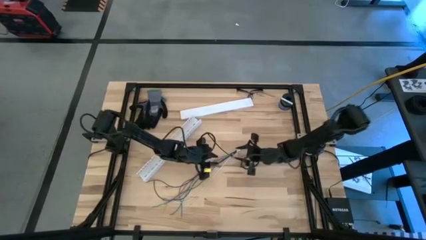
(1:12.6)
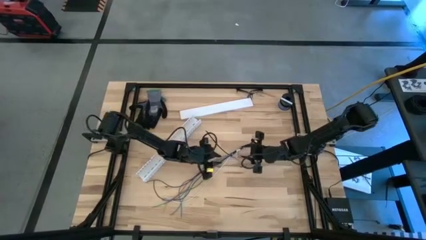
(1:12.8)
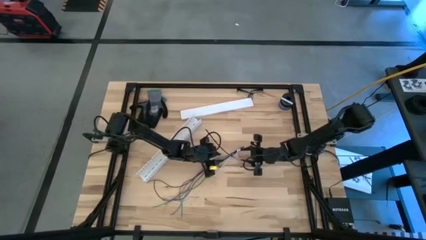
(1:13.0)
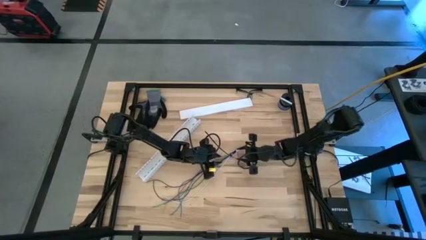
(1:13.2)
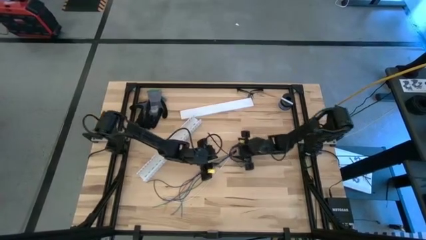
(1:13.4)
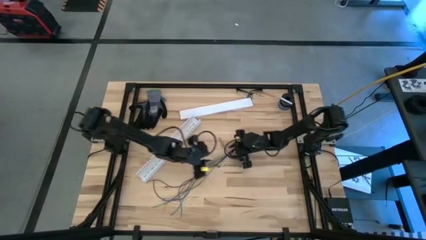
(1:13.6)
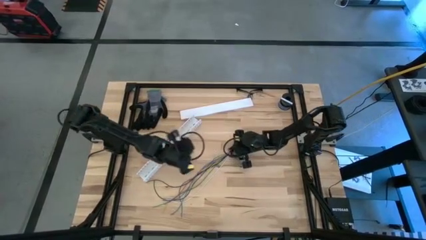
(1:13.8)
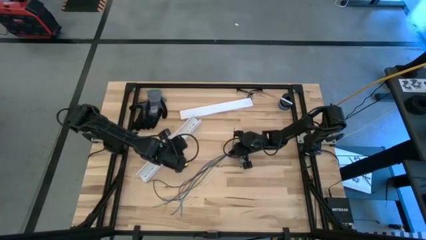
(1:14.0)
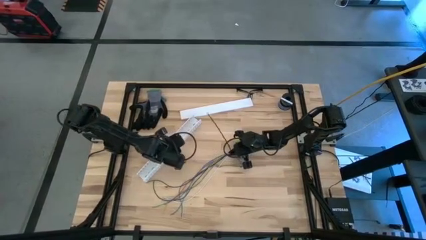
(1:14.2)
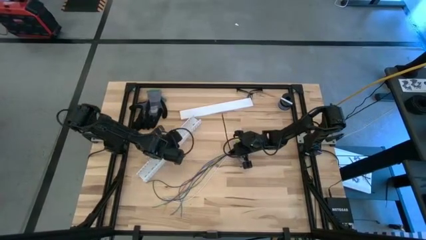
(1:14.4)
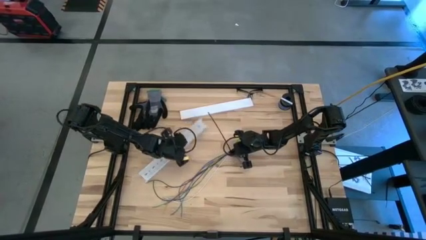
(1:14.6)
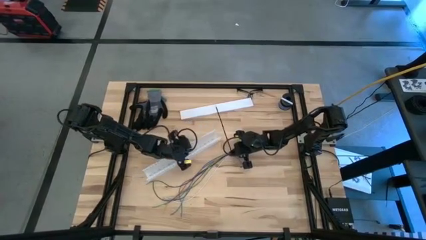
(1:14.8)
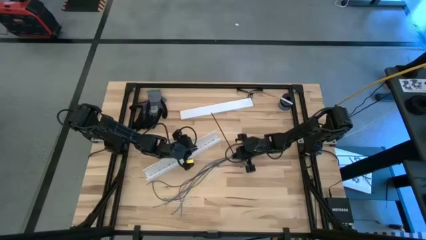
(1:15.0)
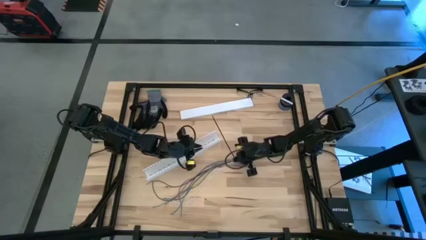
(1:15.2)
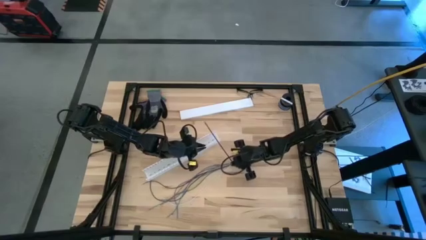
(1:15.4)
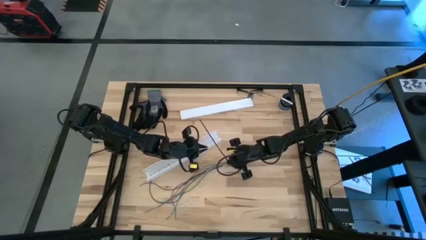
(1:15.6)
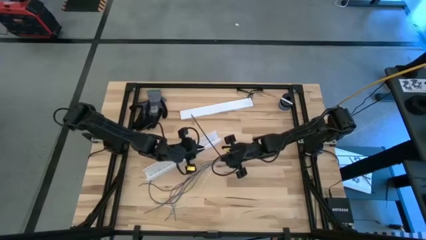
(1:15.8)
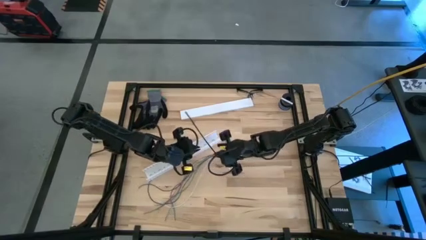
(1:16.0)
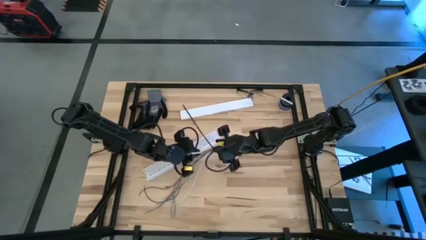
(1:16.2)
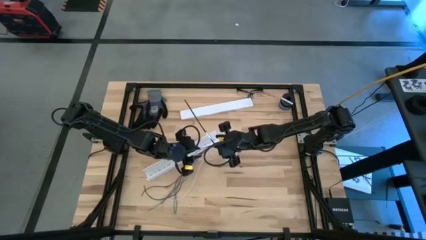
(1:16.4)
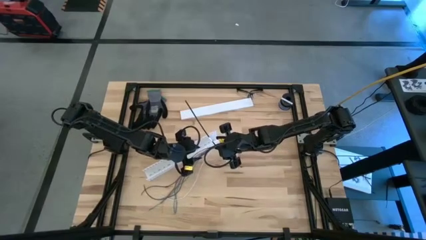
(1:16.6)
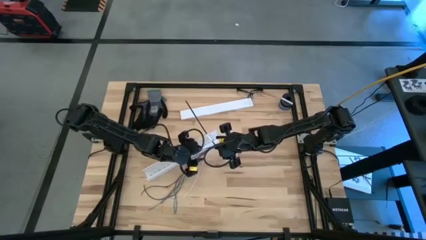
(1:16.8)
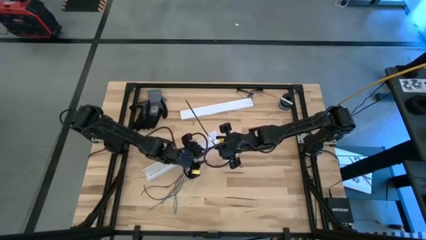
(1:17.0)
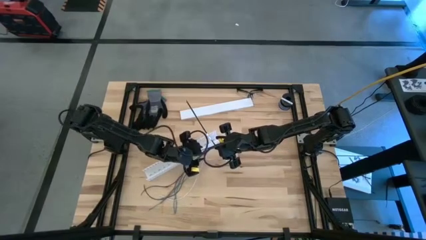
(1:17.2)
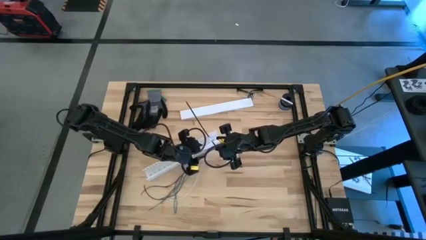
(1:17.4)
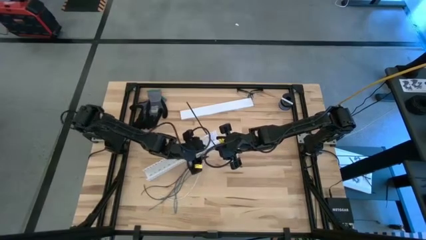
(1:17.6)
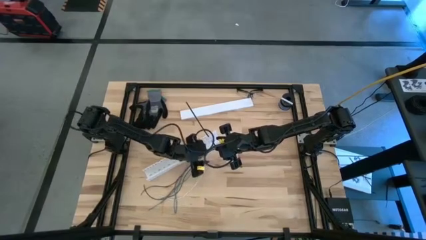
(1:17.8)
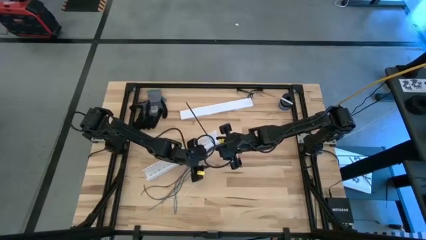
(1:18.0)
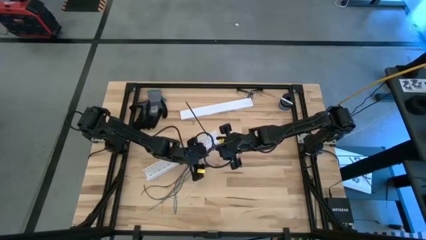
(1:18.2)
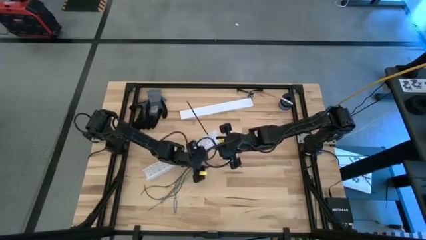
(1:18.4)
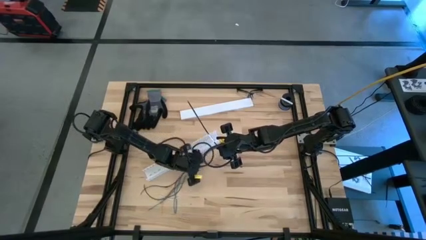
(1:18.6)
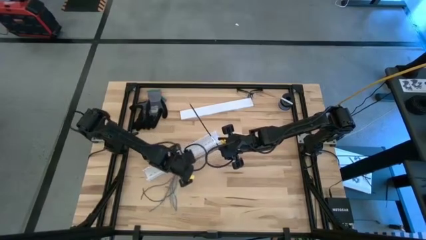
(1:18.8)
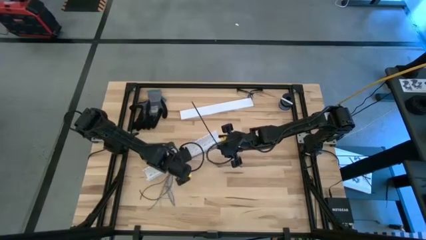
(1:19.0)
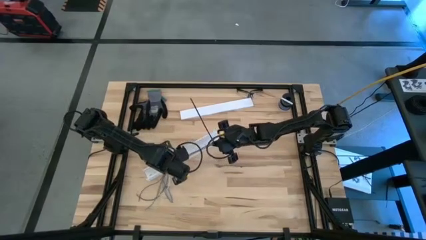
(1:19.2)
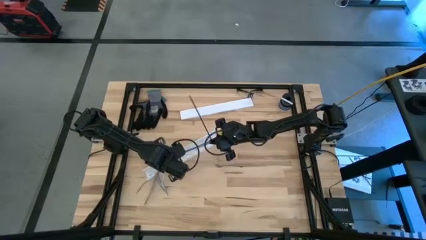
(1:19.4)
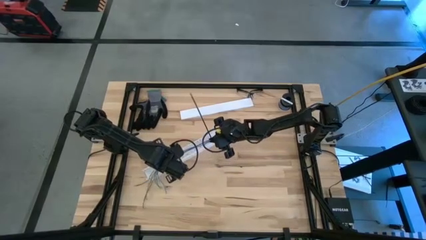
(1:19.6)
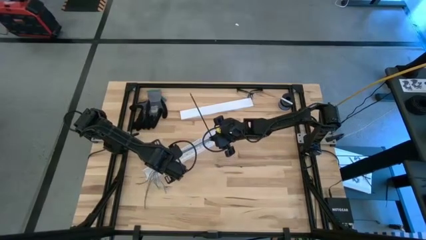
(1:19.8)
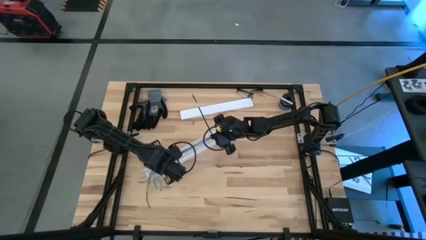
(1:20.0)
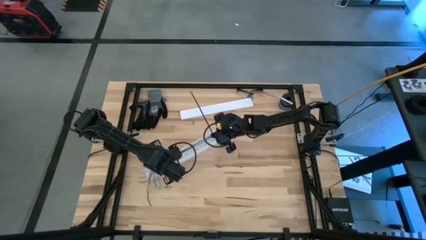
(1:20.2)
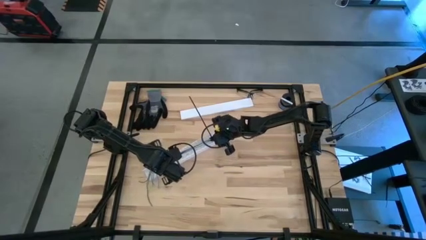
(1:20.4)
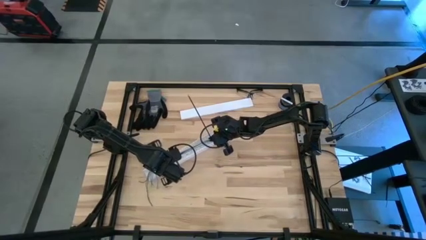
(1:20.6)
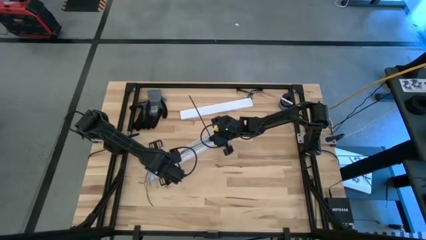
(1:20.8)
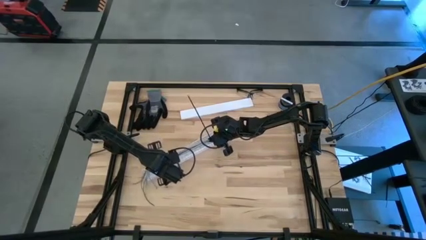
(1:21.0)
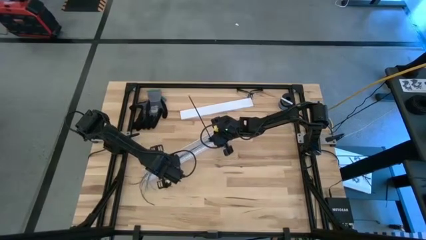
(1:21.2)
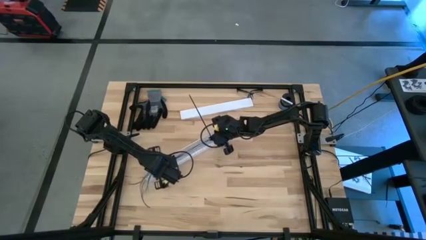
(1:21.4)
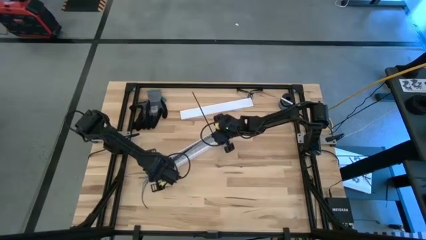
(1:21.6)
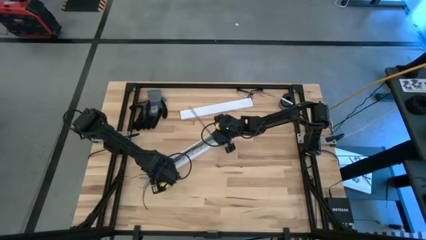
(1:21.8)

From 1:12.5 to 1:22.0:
Task: Ziptie cables
Put the ziptied cables into the white cable duct

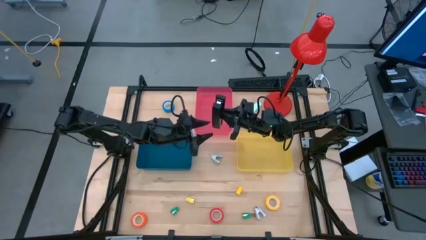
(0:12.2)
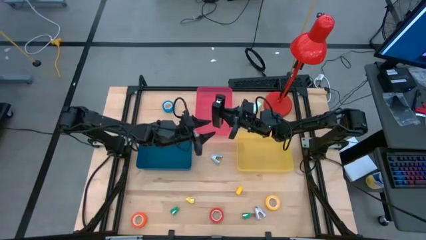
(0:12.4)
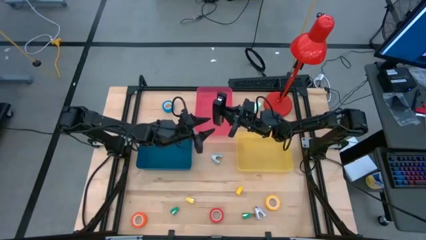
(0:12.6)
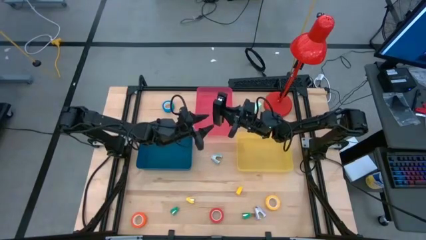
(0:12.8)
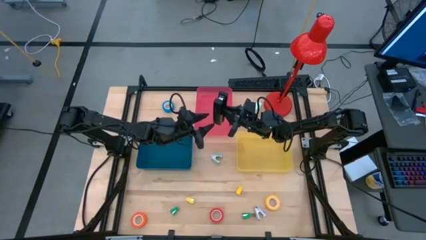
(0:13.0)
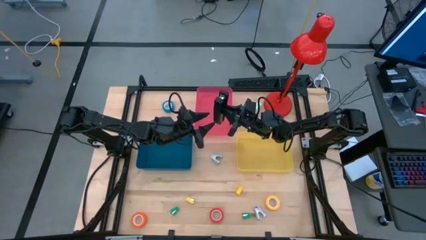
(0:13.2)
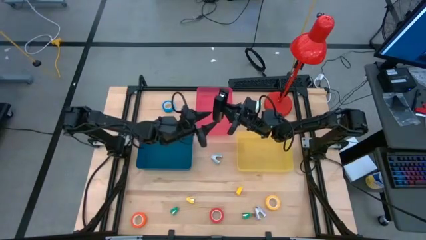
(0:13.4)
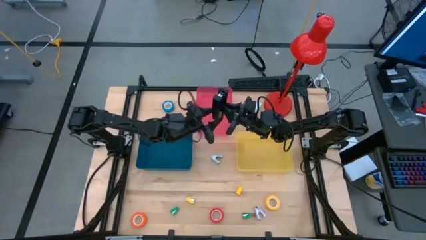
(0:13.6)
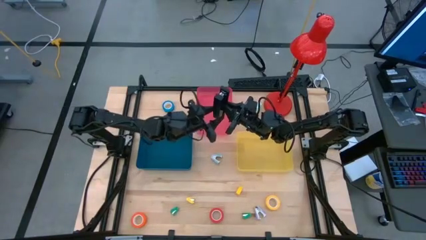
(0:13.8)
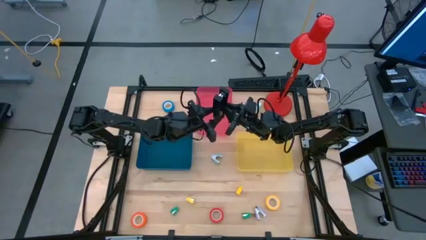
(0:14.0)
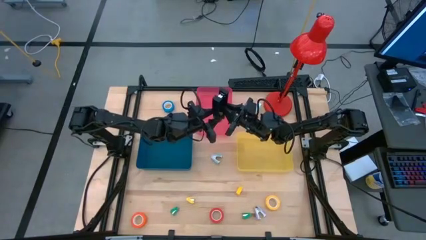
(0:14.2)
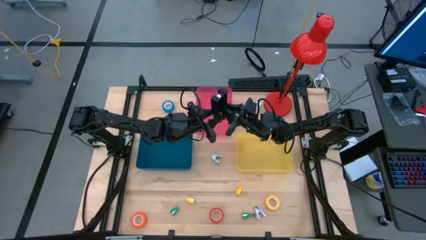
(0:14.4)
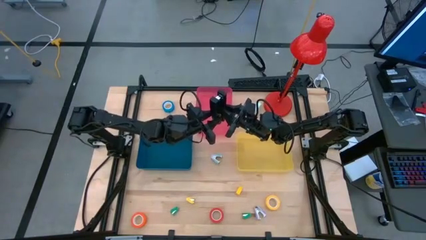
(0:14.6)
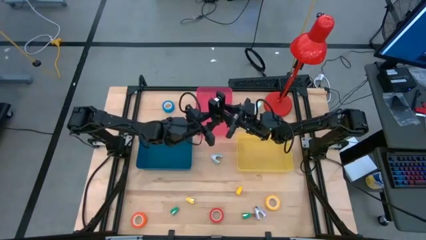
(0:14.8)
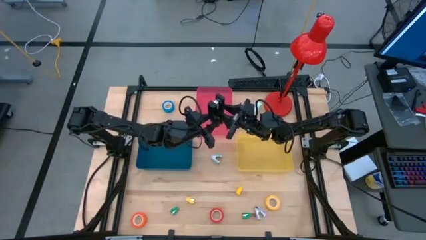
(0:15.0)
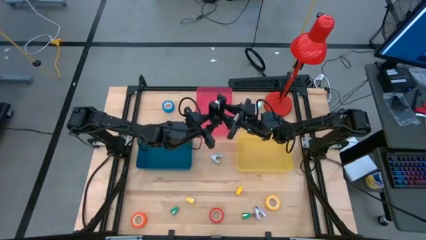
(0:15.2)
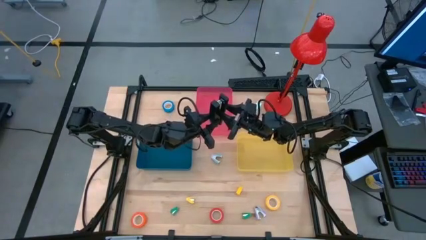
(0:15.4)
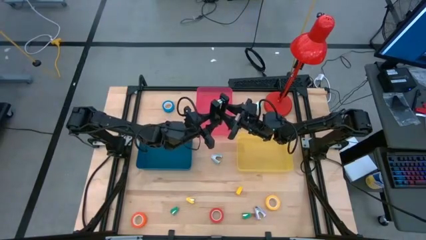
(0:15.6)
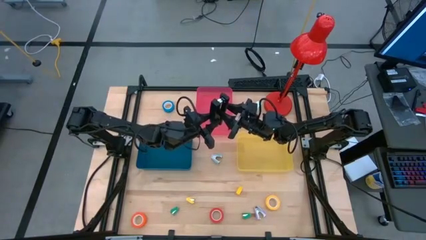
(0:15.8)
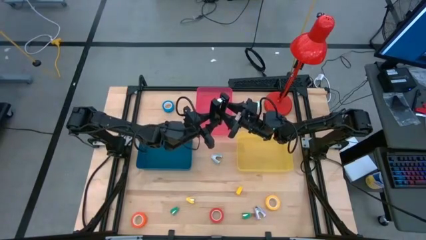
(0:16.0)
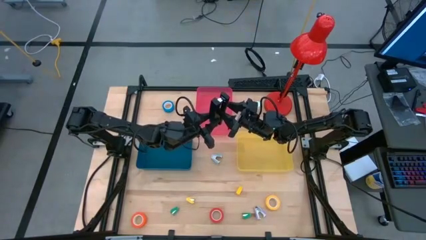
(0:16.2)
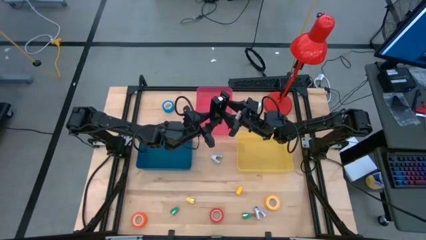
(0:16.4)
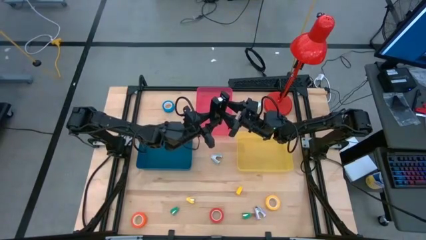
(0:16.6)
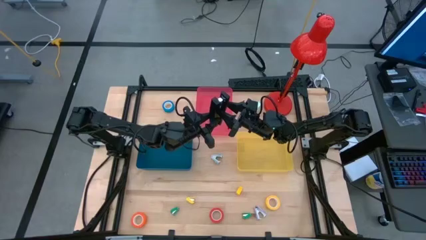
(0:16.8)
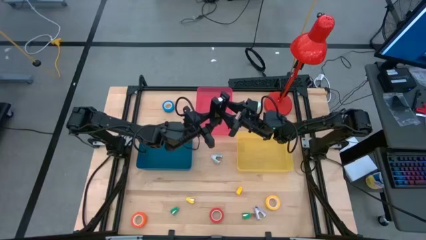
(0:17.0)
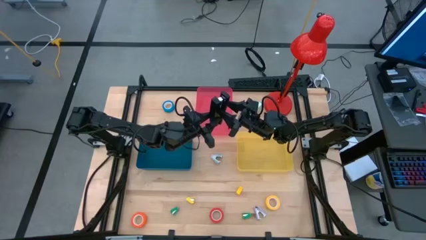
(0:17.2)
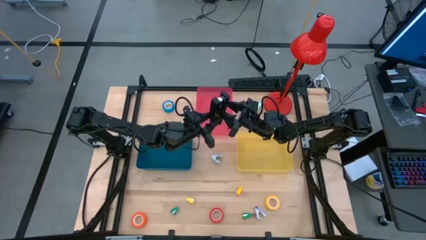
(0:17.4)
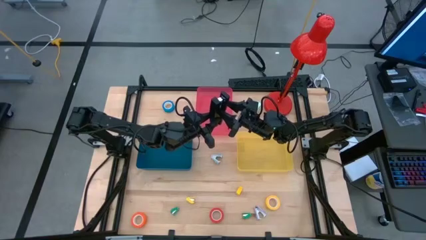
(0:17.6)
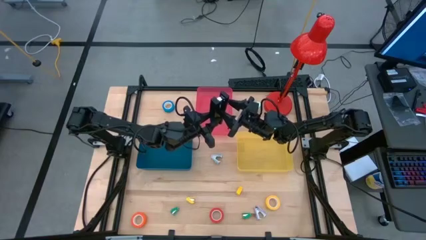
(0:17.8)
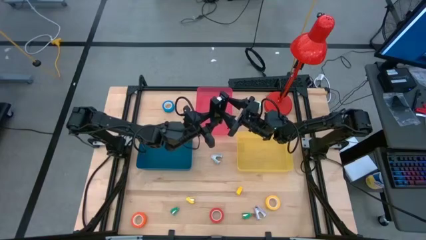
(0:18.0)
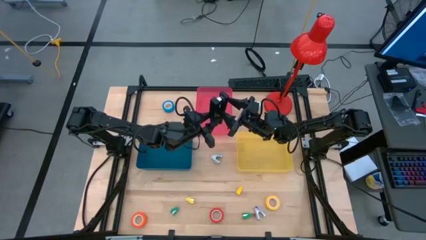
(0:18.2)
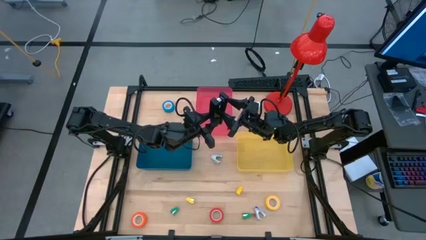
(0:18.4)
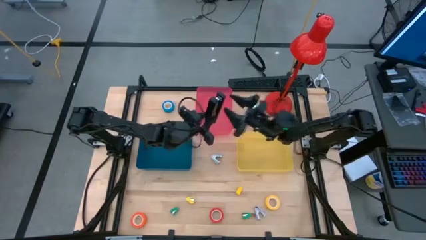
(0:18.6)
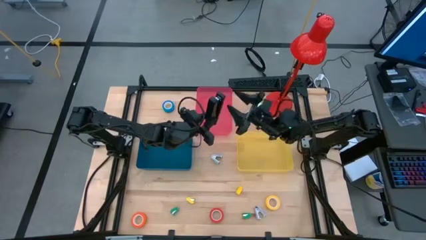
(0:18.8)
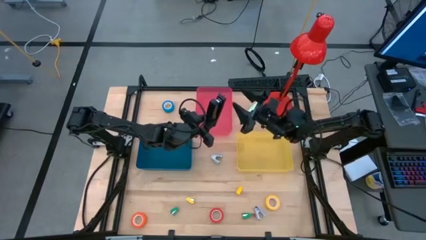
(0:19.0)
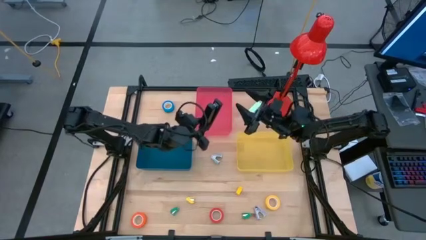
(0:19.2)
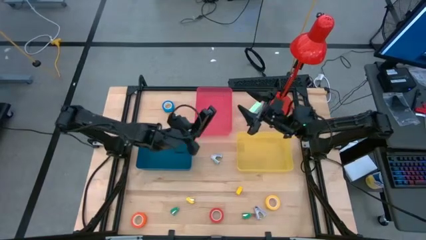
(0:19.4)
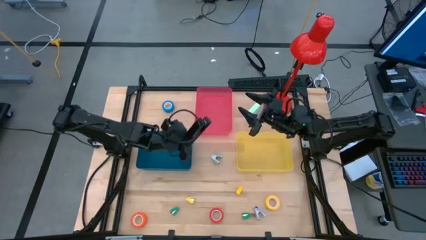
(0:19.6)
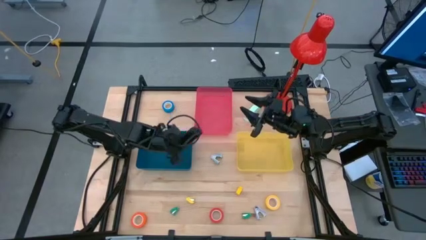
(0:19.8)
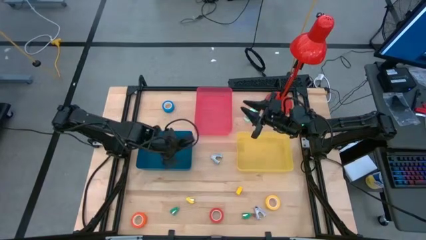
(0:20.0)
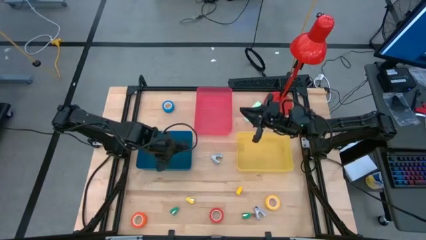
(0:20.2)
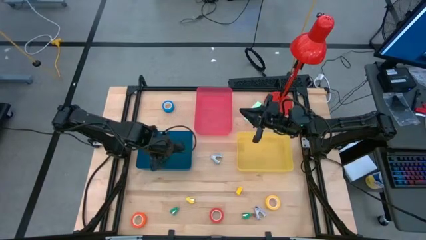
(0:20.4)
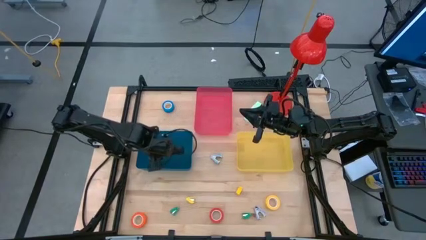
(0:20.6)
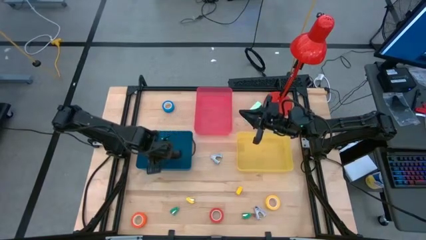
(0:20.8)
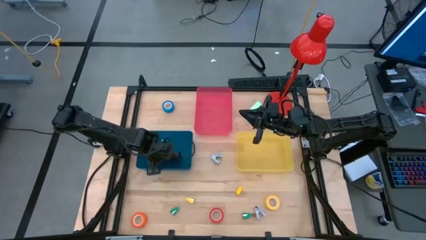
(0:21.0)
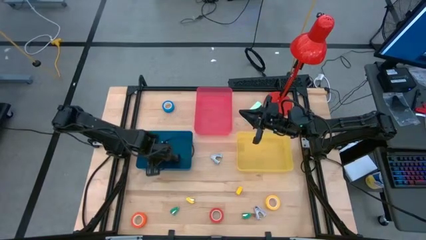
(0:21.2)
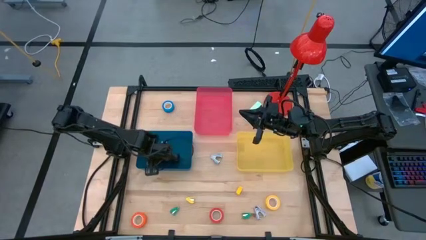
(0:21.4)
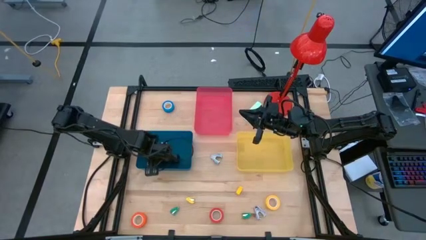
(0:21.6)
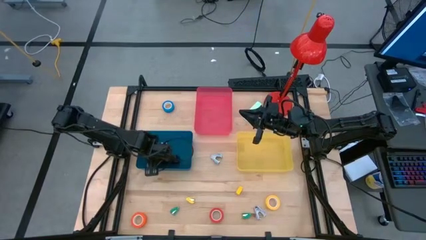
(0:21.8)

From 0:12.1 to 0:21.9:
Task: Pick and place Stapler, Stapler remover, tape
Put the black stapler into the blue bin
